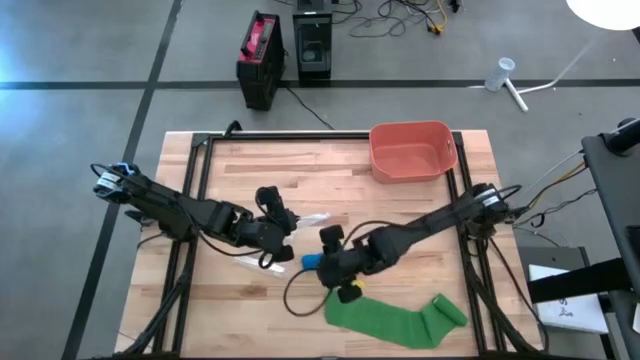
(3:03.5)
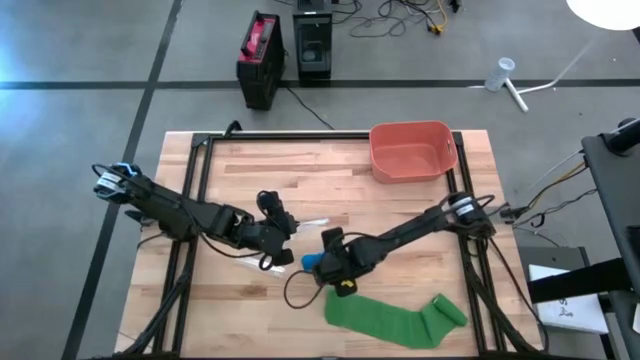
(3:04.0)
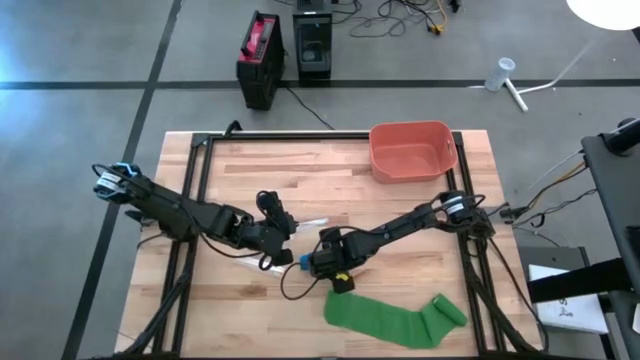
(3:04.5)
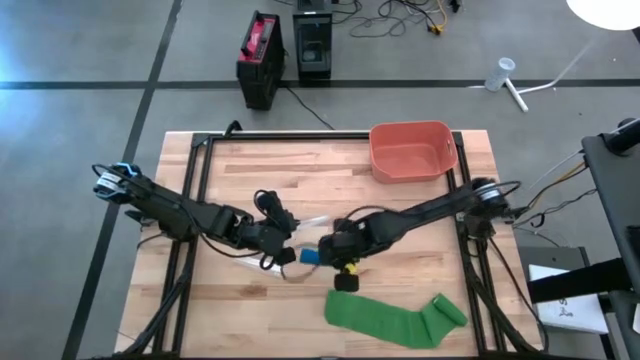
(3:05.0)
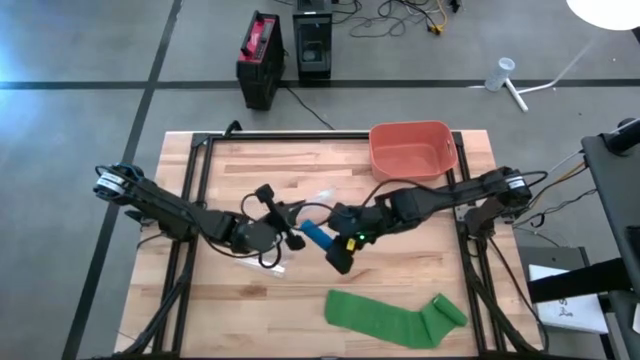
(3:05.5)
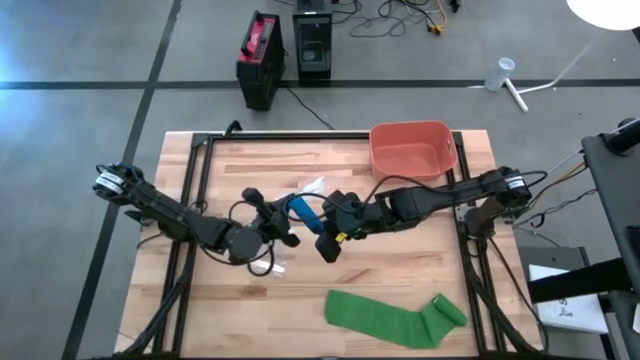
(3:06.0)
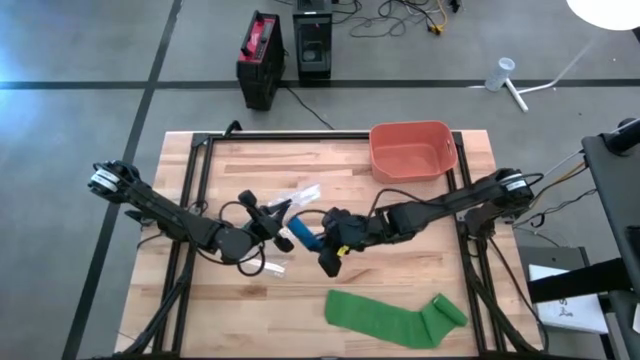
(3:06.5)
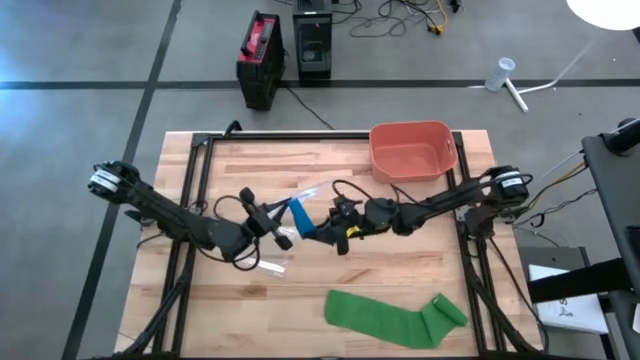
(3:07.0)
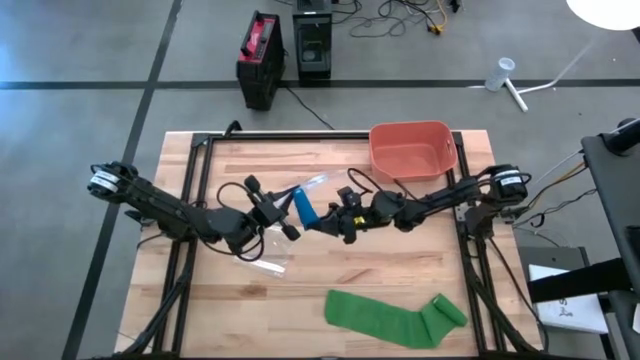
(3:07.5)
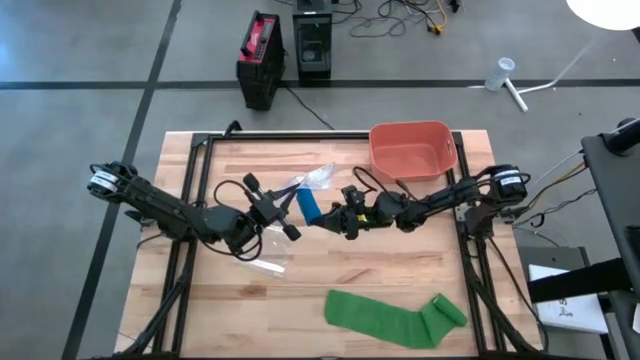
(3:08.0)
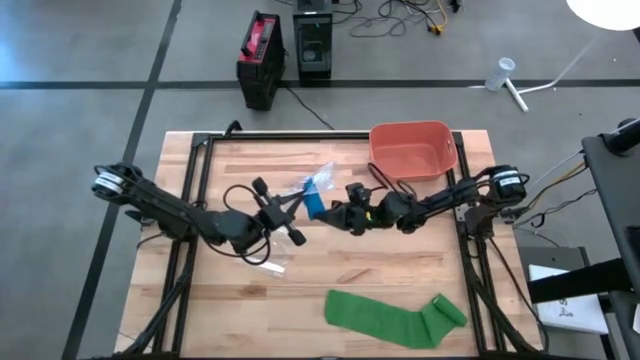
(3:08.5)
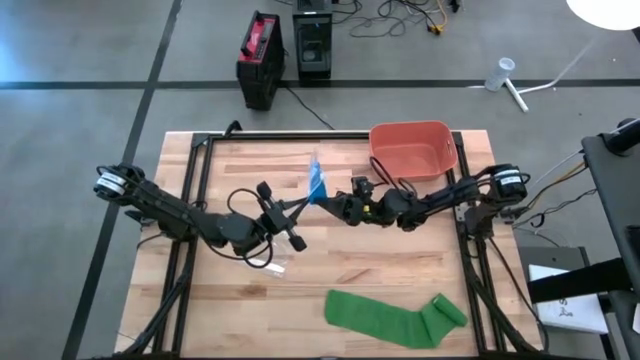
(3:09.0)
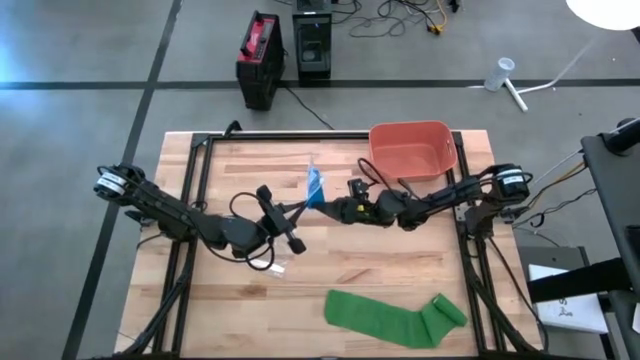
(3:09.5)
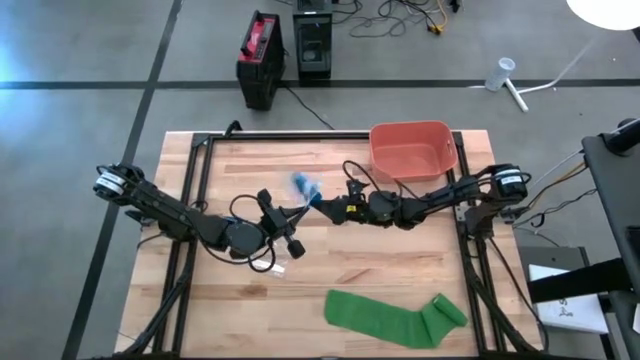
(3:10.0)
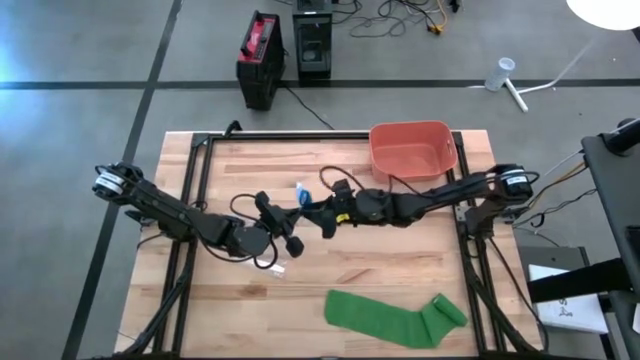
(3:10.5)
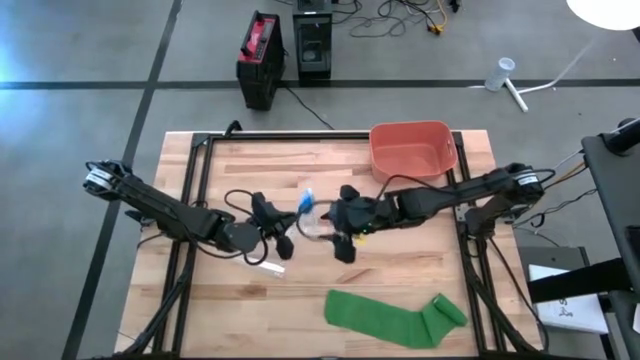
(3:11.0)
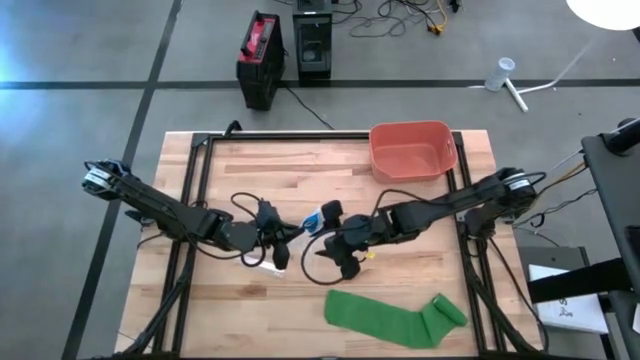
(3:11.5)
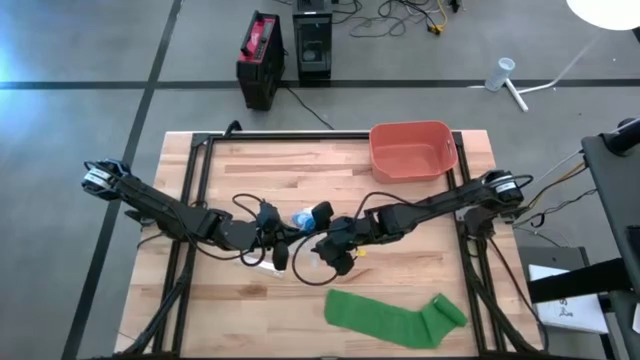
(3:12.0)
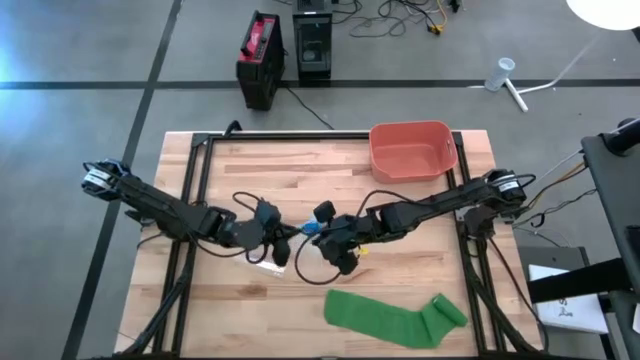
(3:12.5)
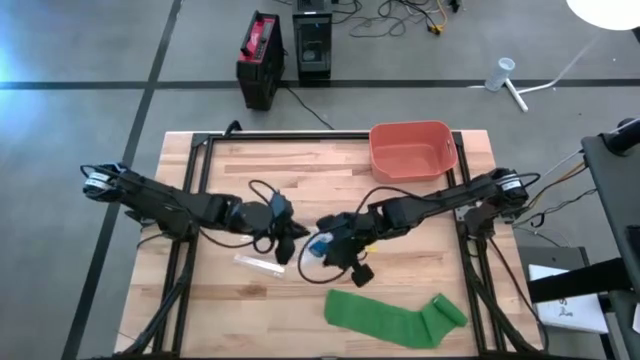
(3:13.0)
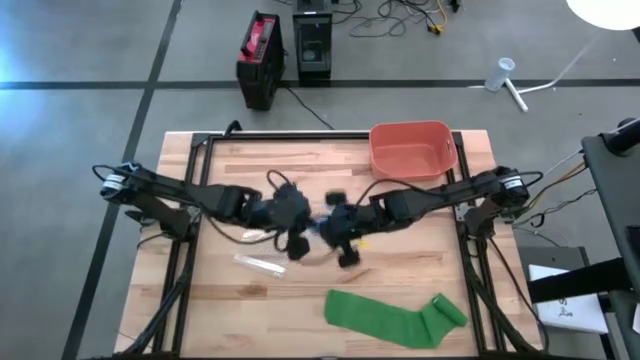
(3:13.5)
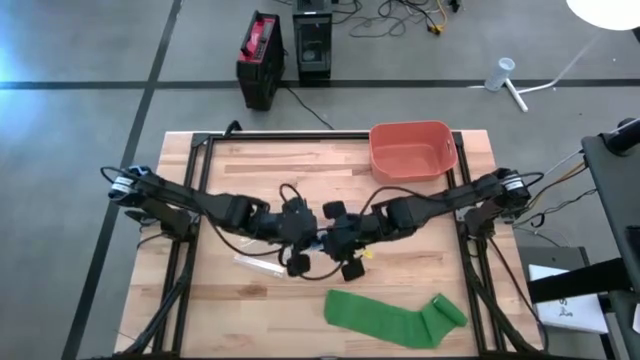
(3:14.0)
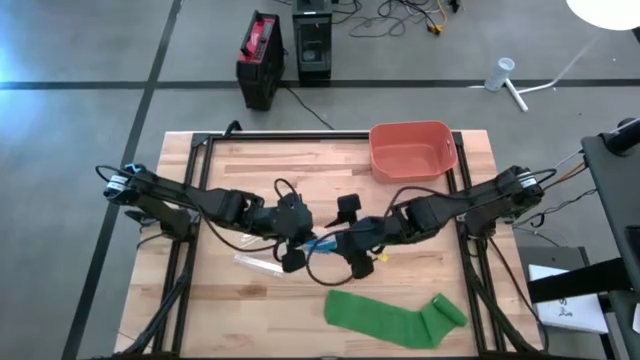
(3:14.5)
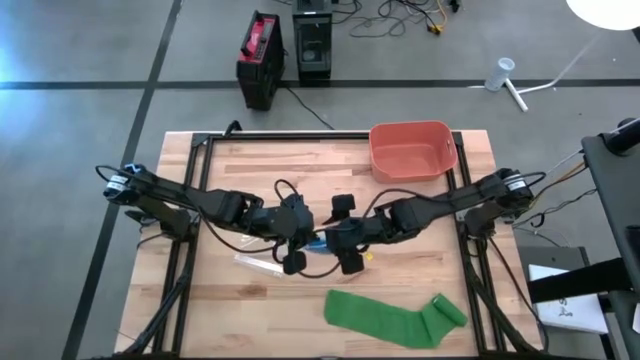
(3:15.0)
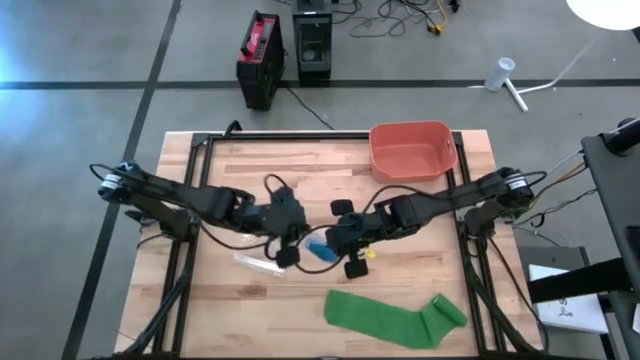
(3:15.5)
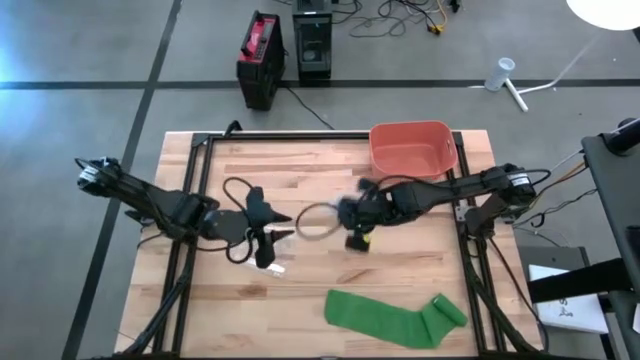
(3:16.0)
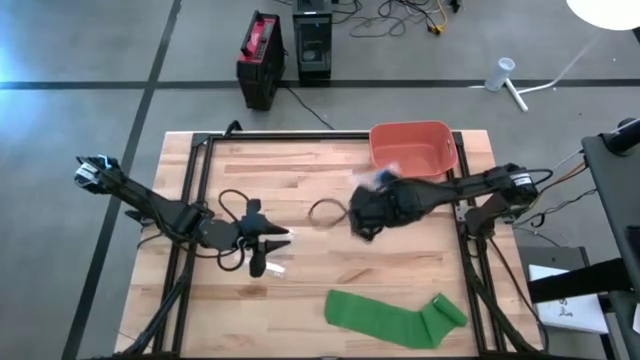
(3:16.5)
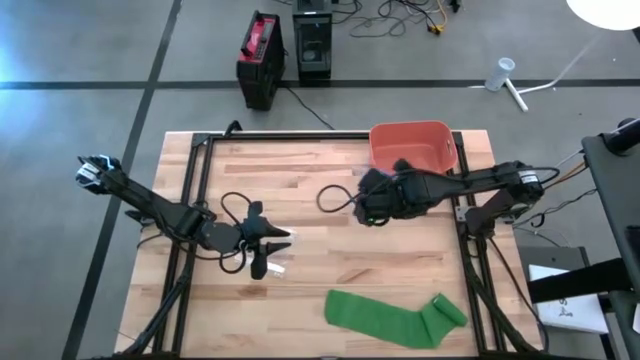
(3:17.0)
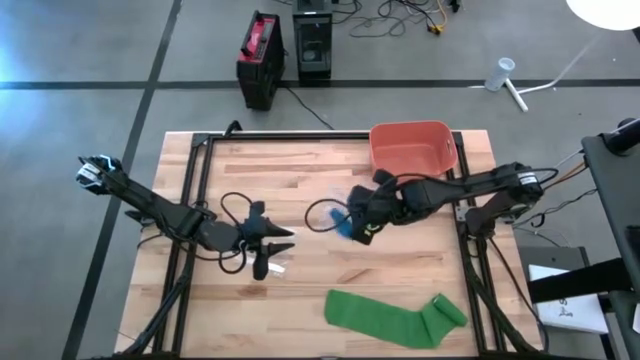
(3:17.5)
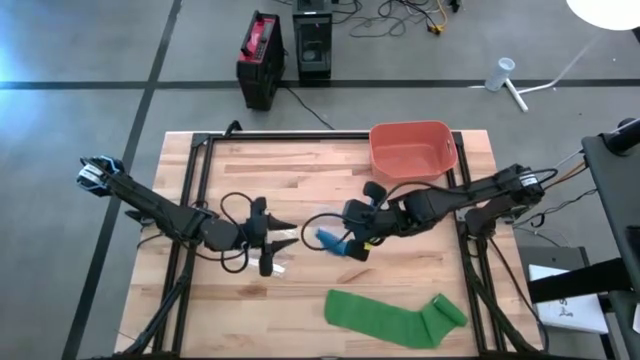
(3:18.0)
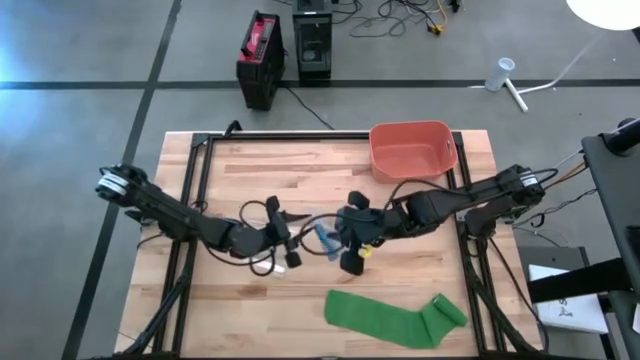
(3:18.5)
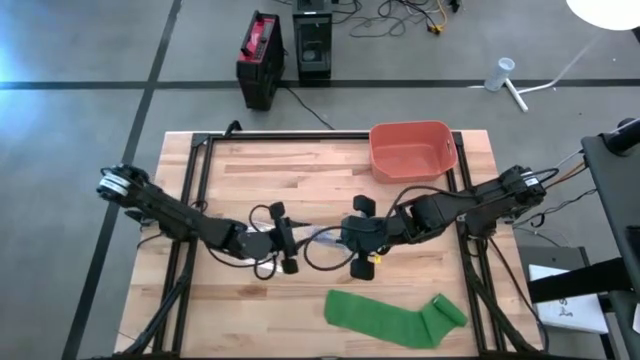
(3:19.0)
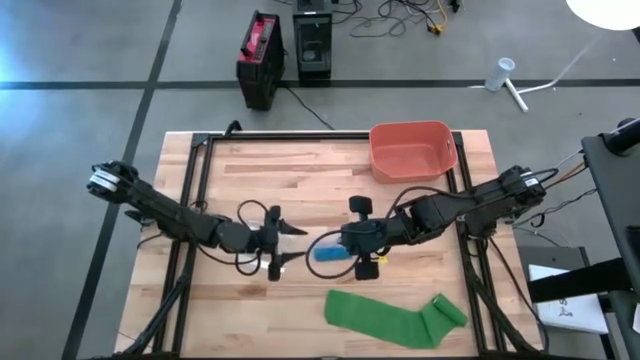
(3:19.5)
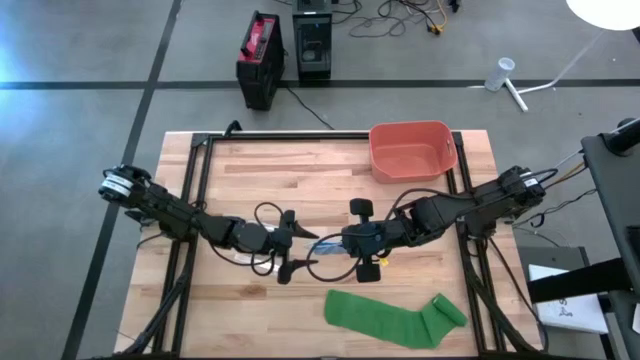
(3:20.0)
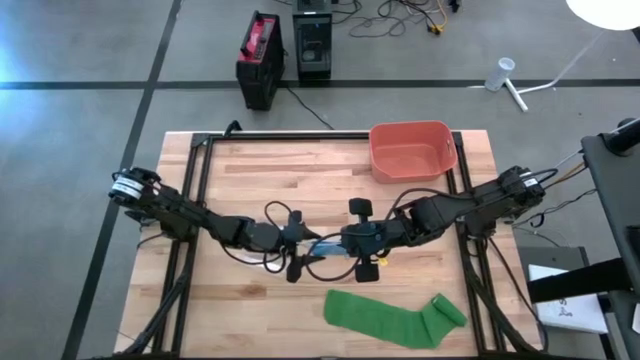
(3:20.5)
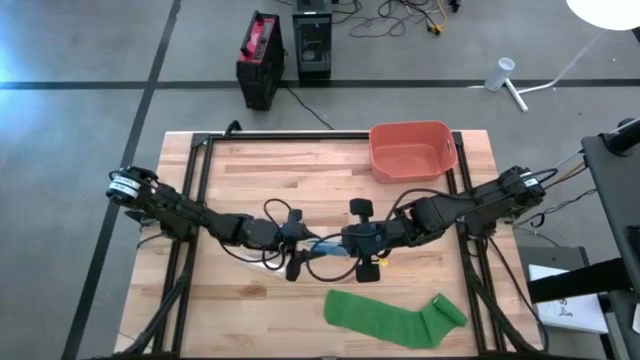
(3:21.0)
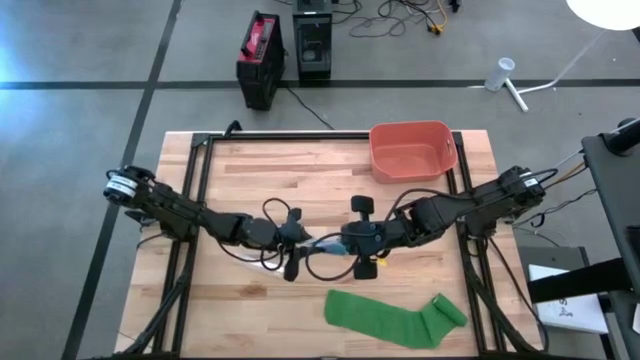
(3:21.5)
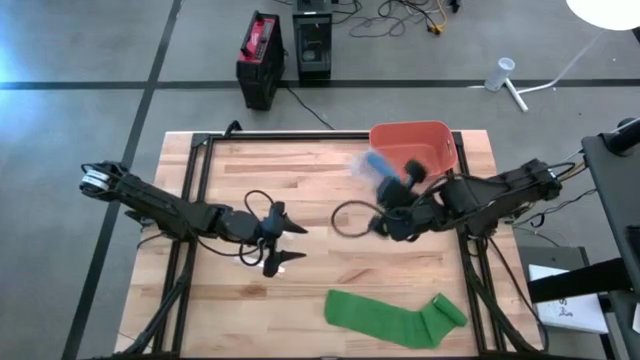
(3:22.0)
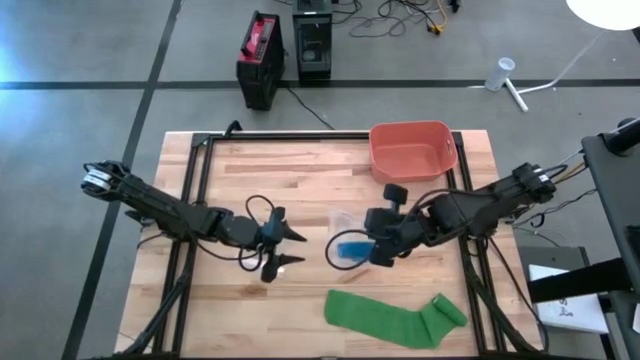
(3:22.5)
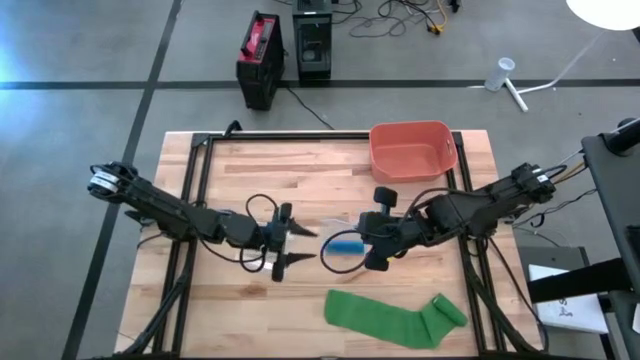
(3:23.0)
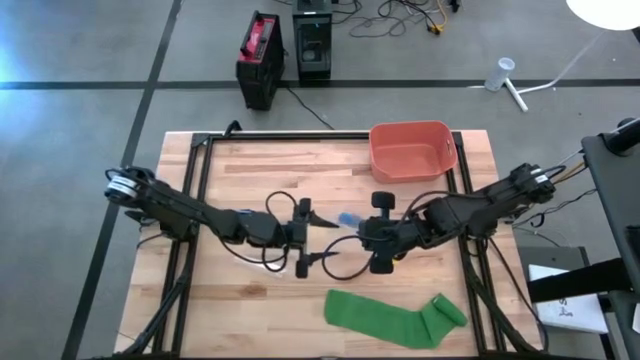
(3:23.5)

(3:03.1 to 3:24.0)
Task: Roll bandage
Put the rolled blue bandage into the transparent zip bag
